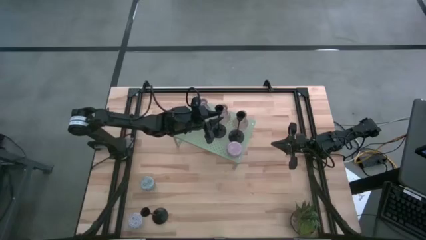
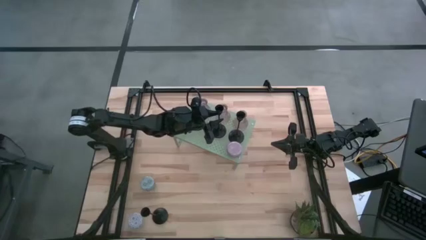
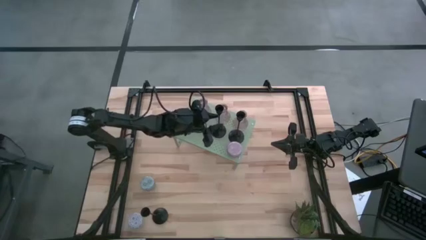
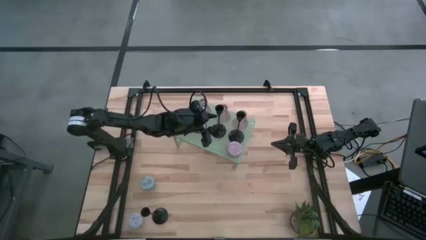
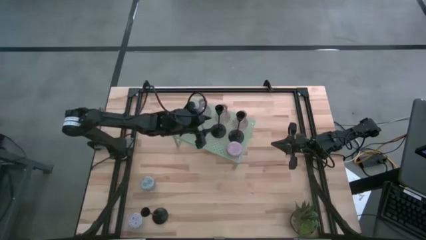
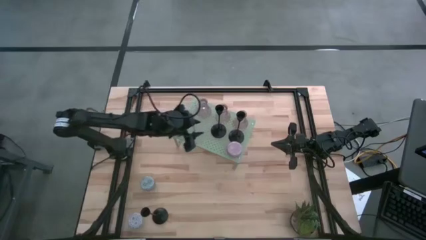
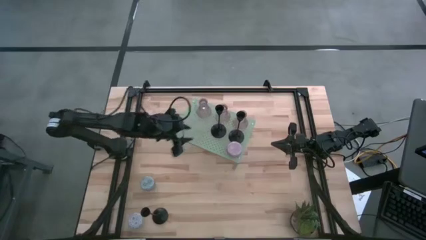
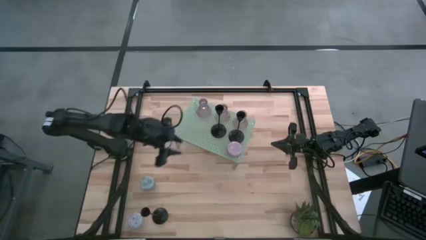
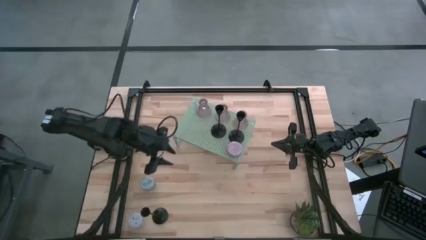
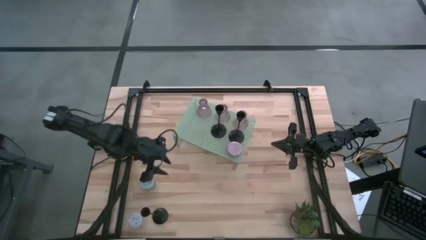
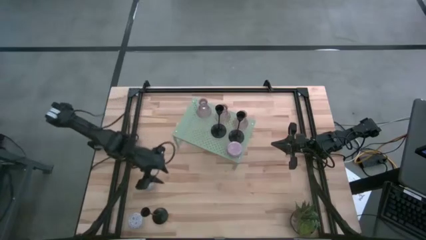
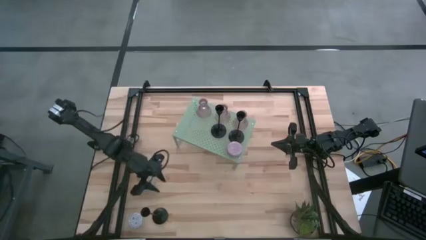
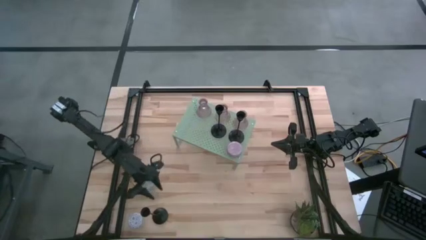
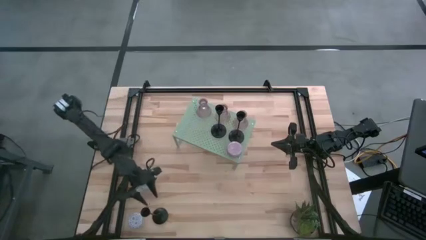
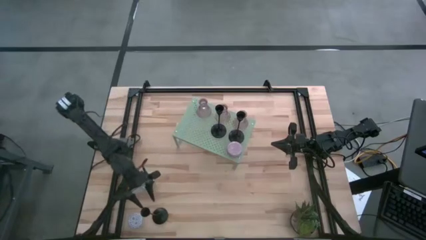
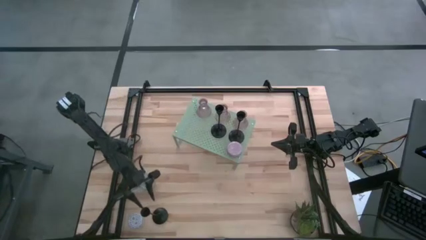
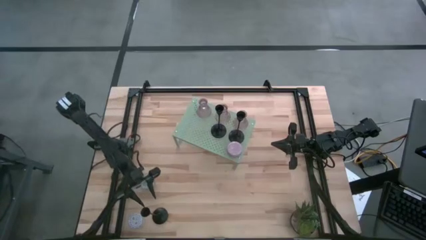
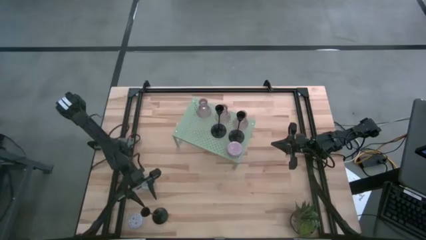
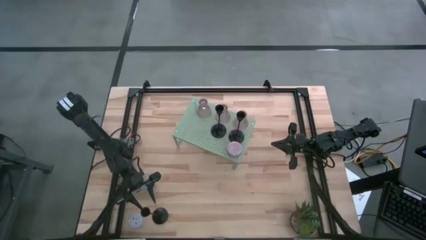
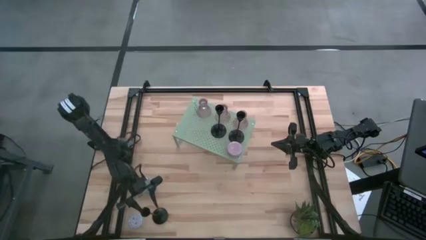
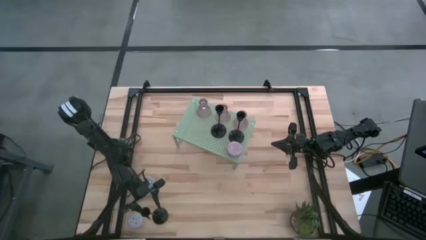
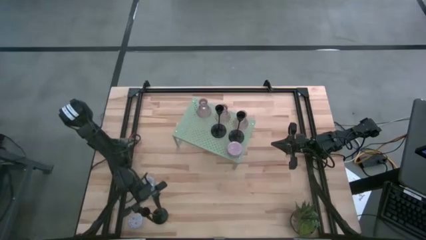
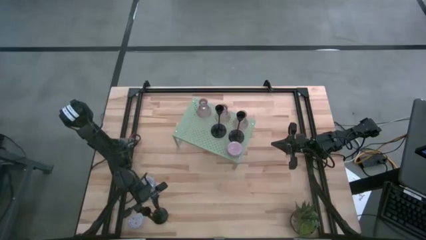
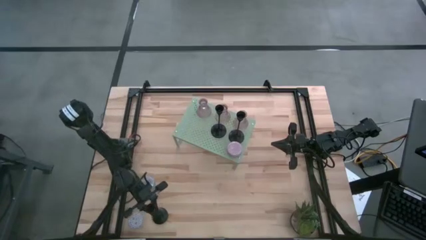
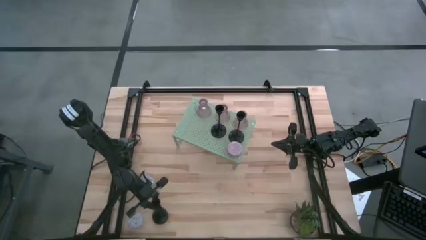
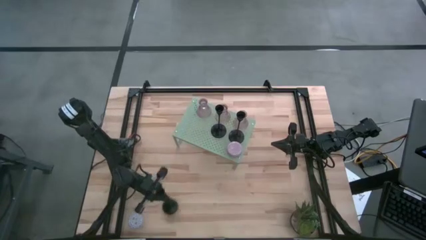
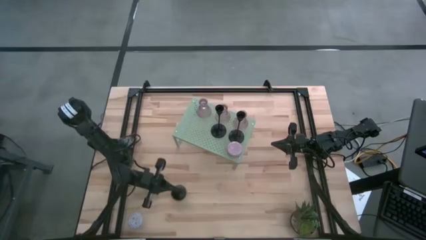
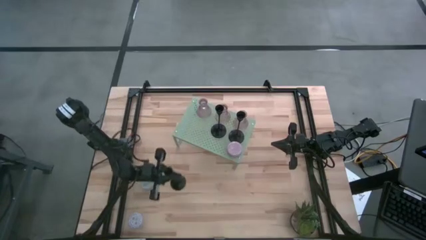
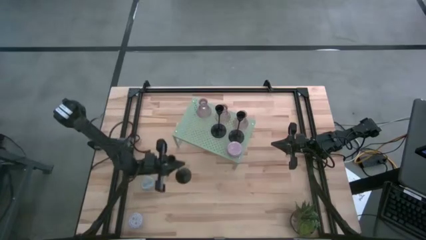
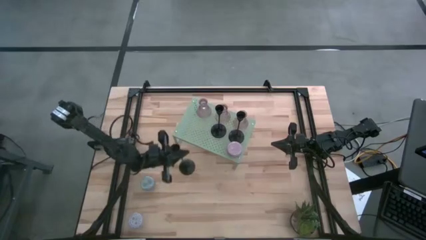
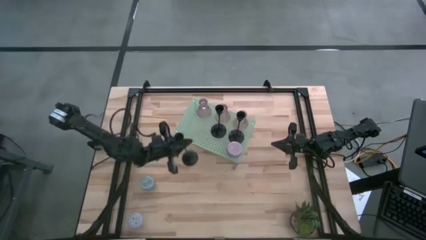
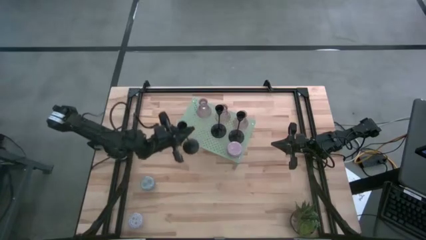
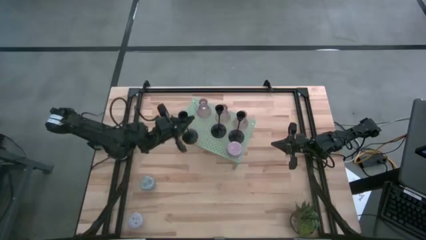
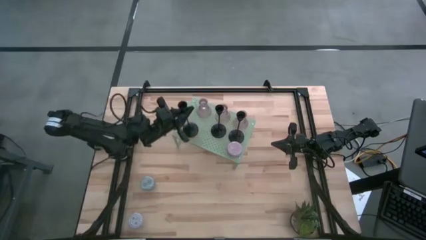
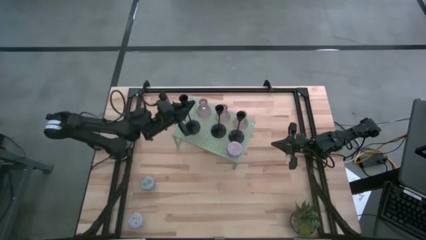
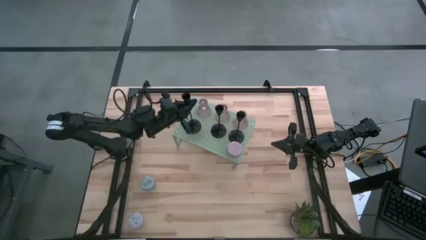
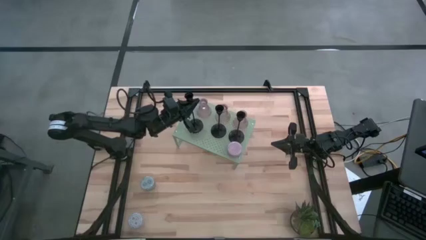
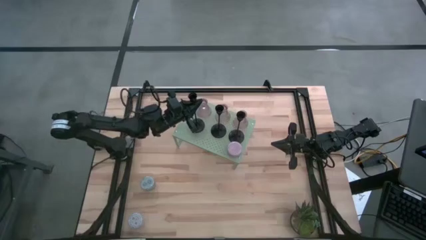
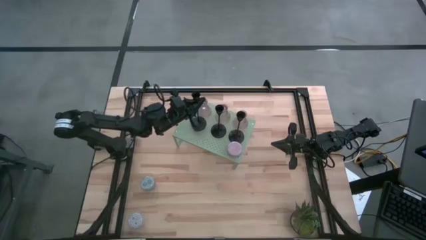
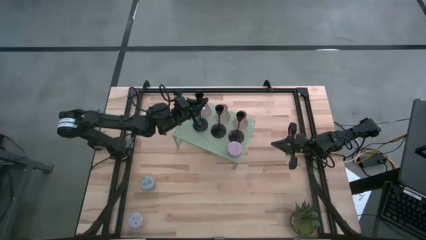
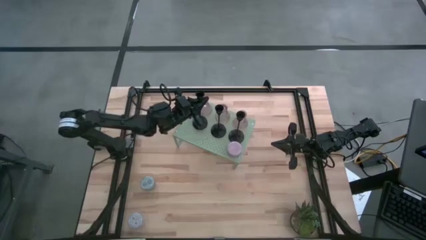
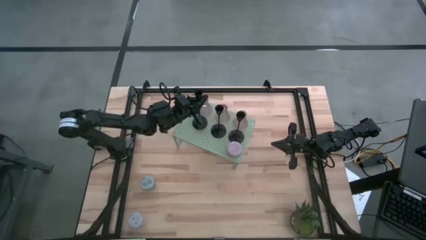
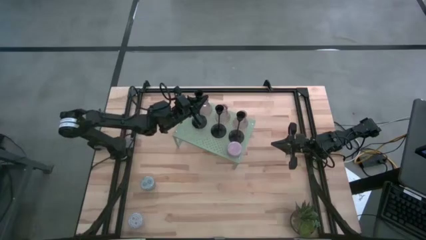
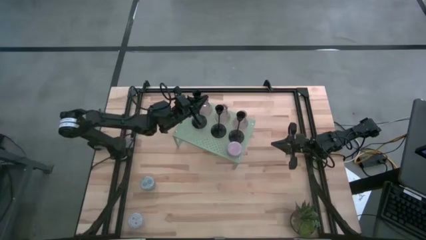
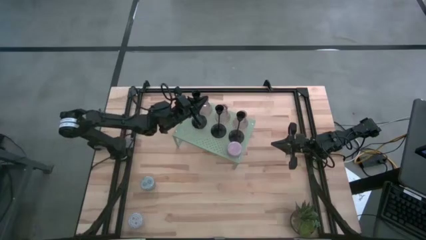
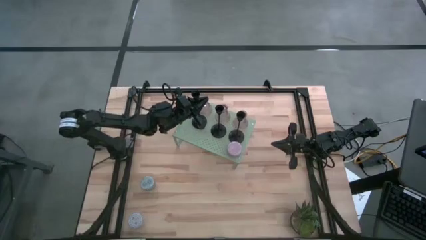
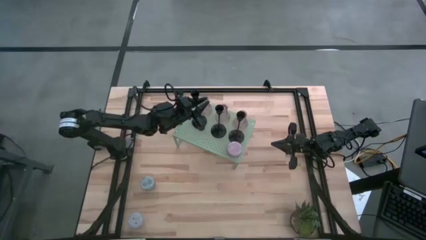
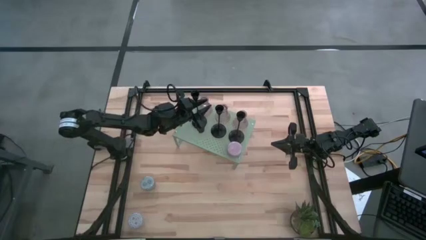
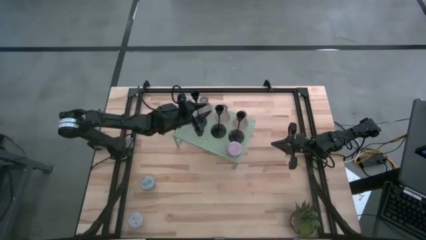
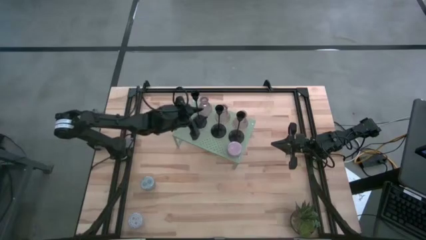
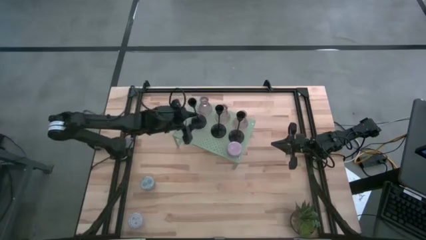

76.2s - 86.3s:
Task: Pick & Place candle stick holders
Put the black candle holder on the shelf aligned with the other black candle holder

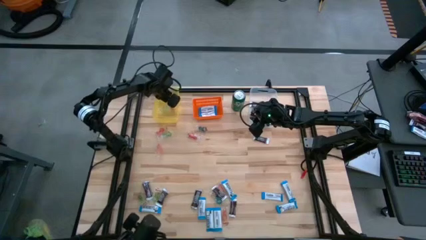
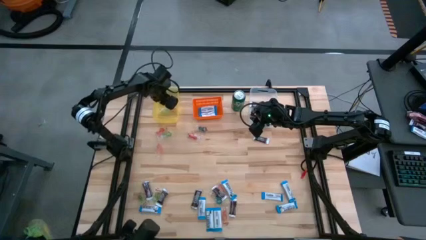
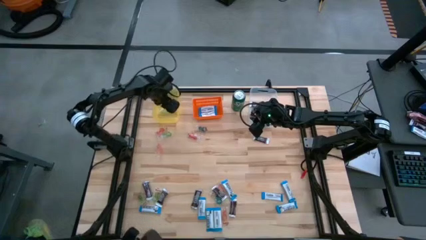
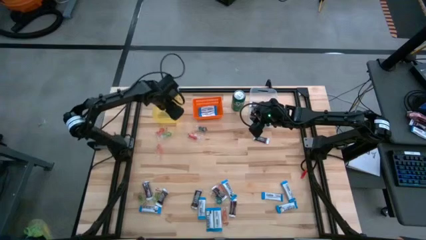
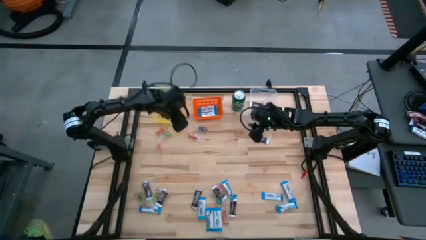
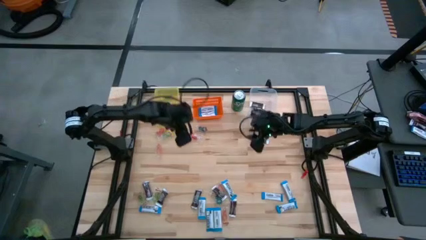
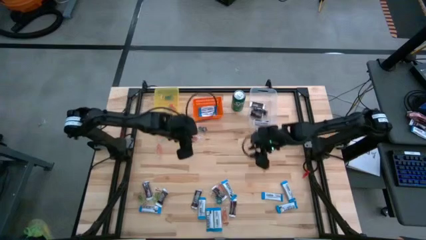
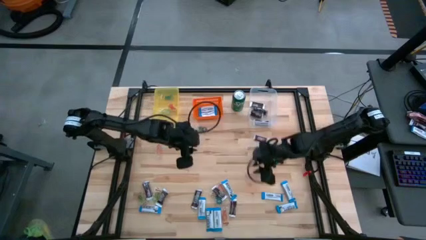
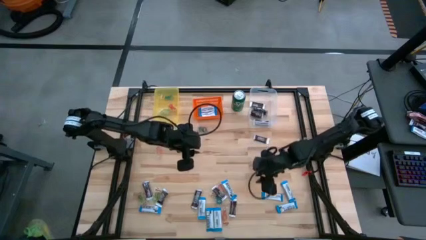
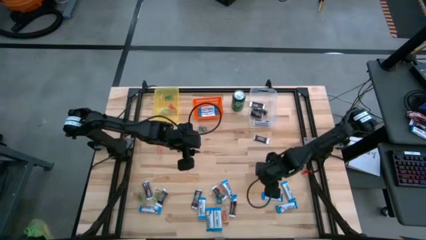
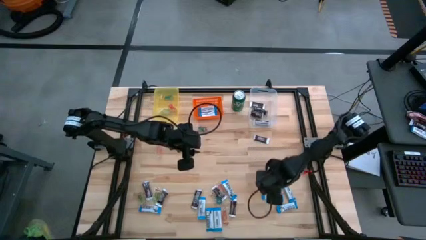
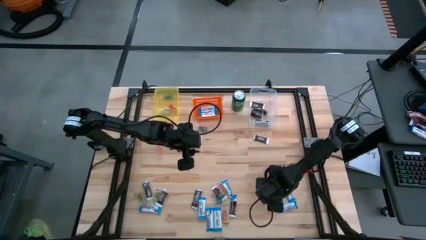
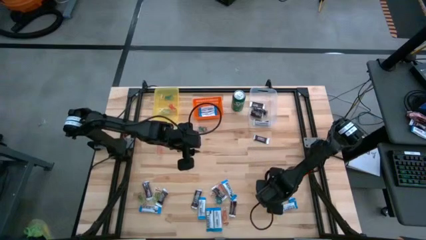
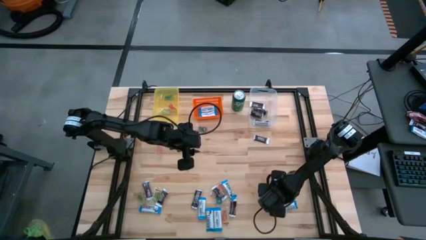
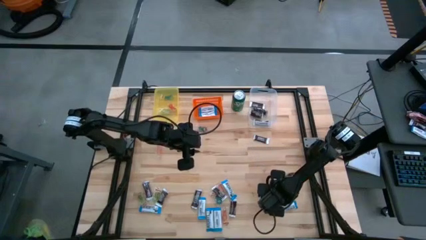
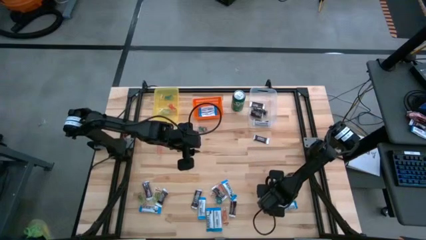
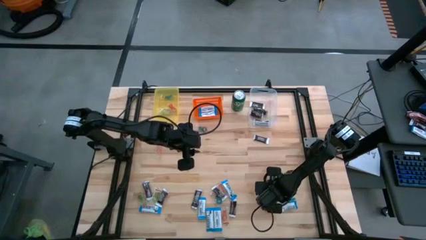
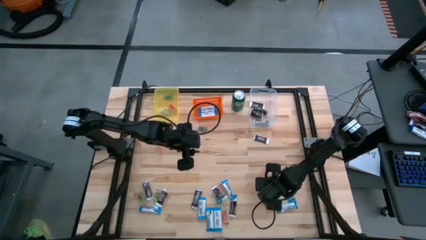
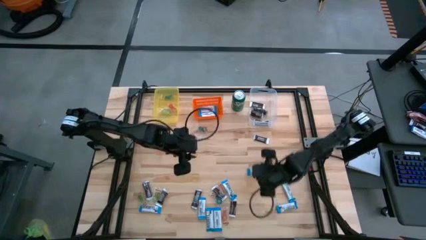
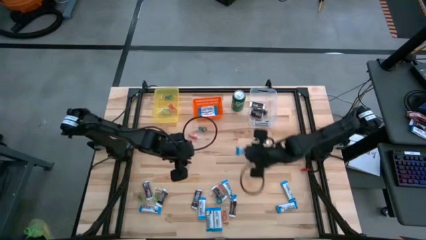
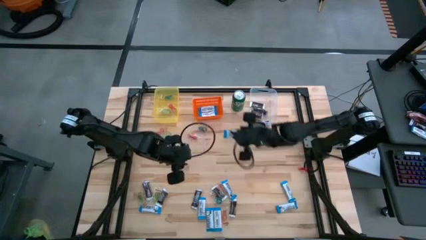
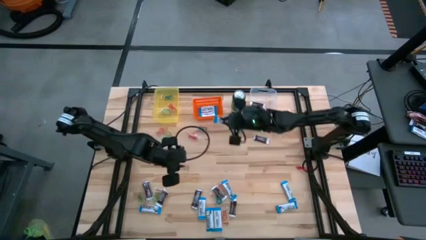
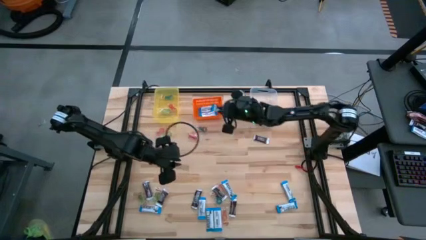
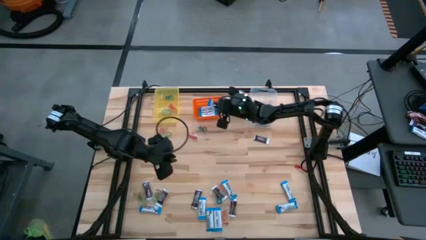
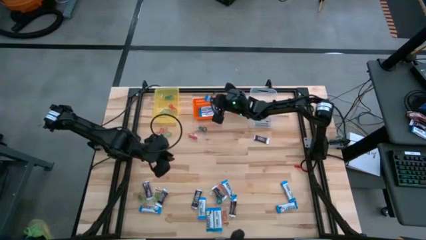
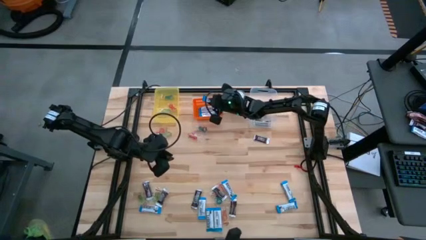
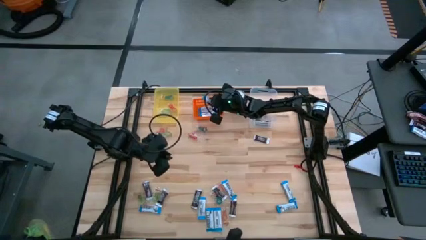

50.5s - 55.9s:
Task: Organize candy in baskets
Put the white chocolate into the orange bin

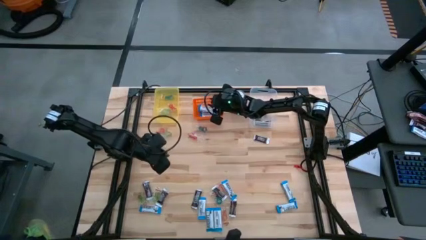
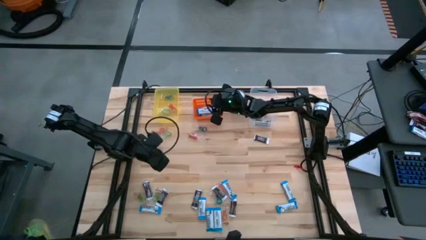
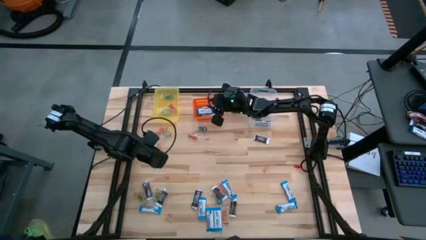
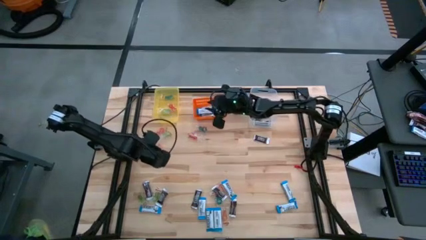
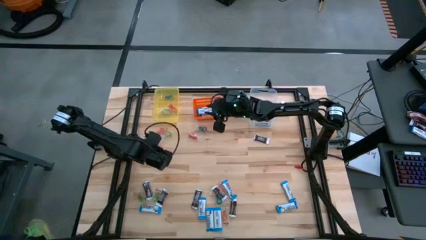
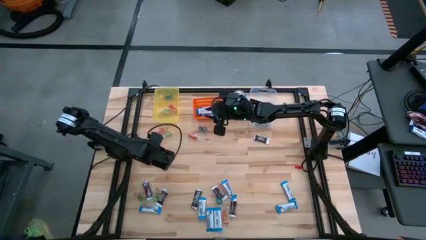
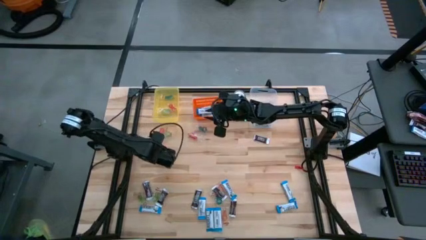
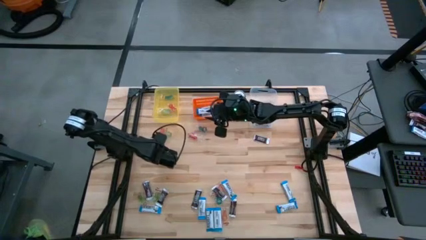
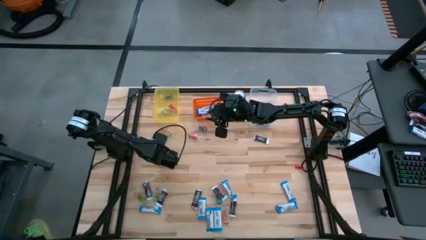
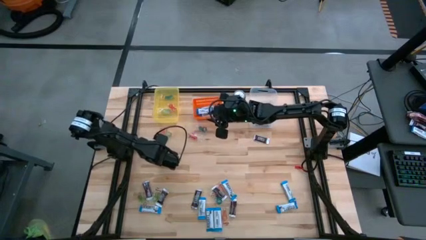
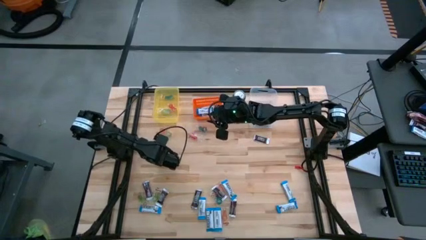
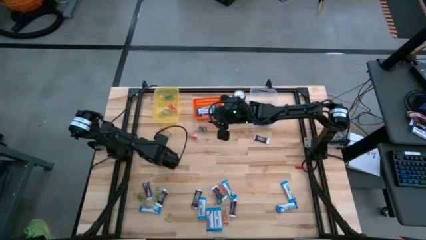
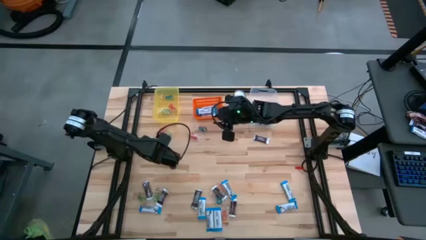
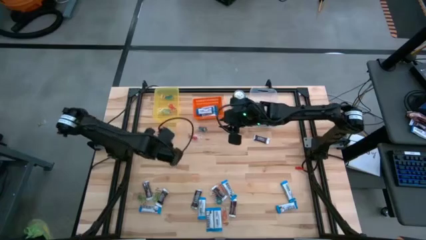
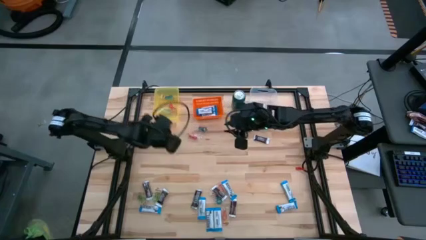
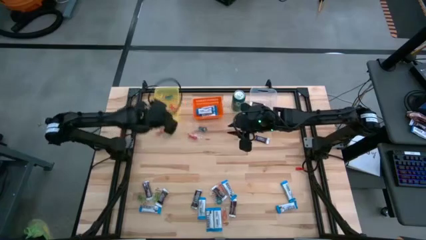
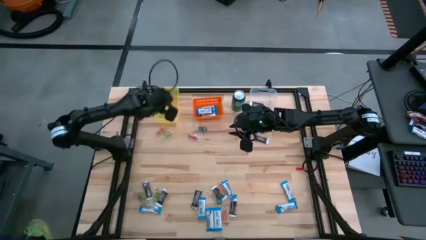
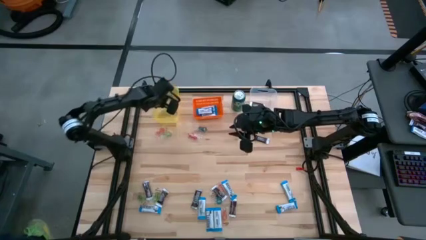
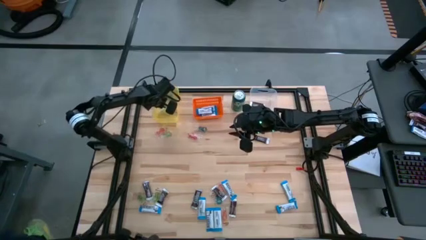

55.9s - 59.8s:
Put the orange gummy into the yellow bin
